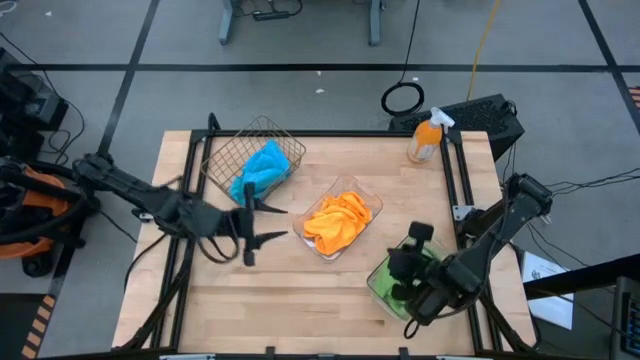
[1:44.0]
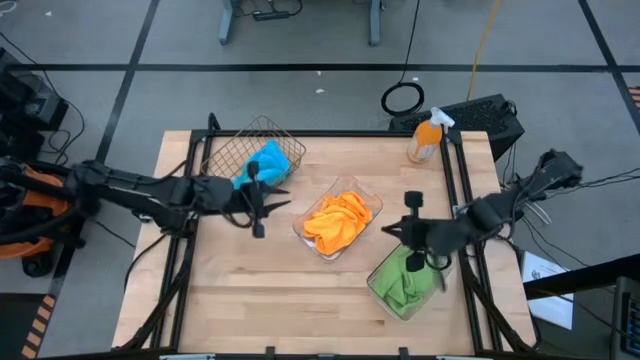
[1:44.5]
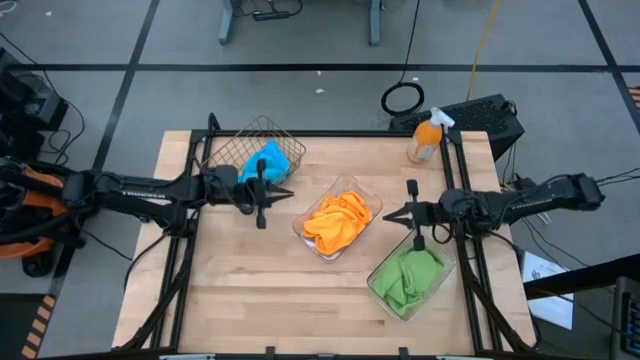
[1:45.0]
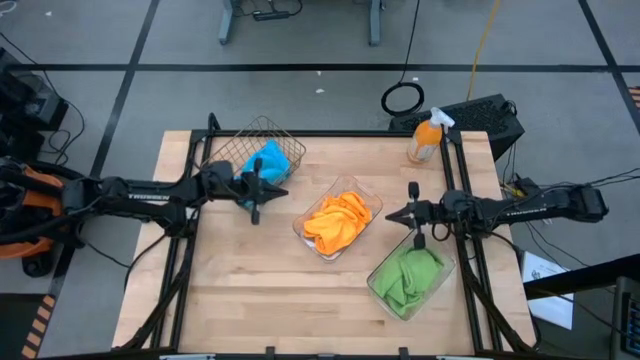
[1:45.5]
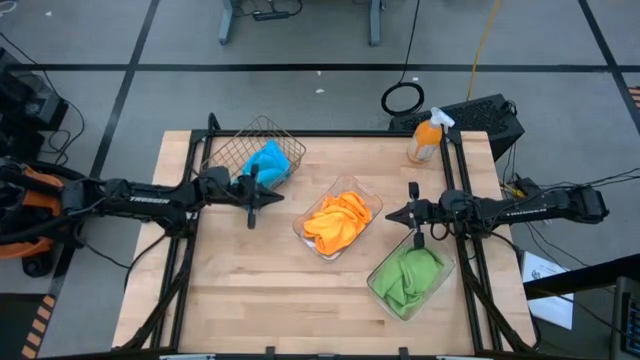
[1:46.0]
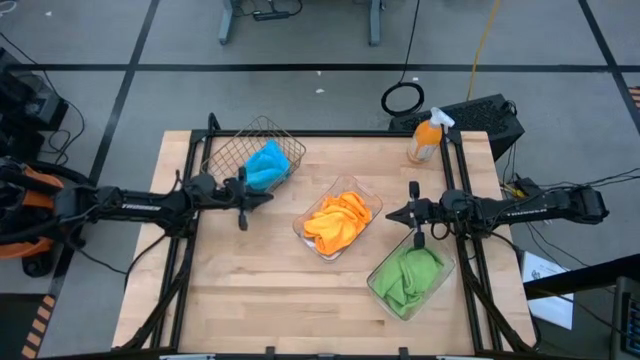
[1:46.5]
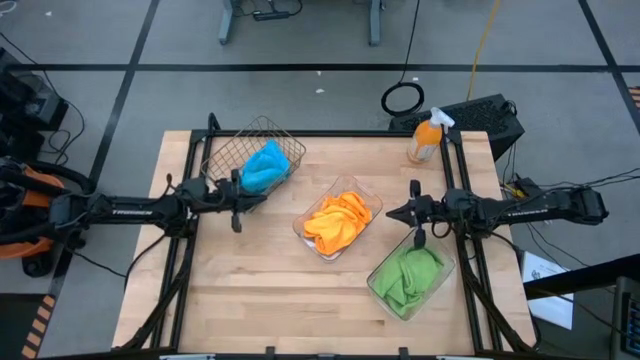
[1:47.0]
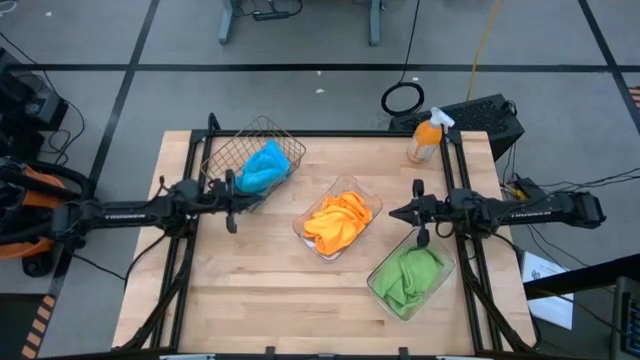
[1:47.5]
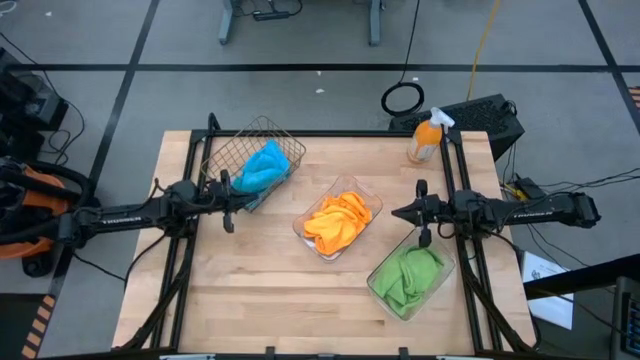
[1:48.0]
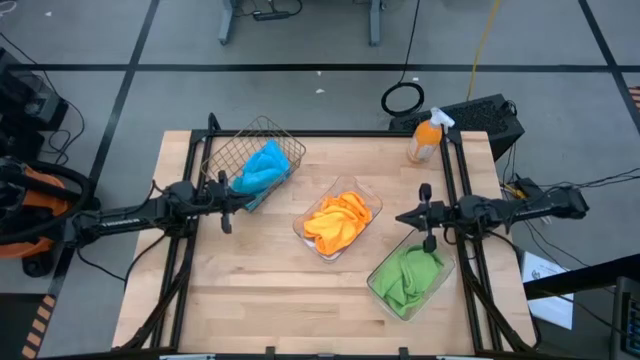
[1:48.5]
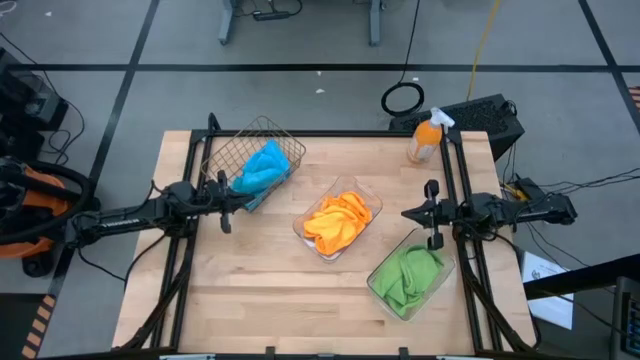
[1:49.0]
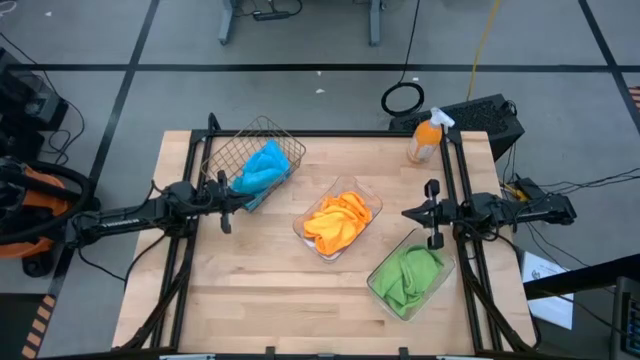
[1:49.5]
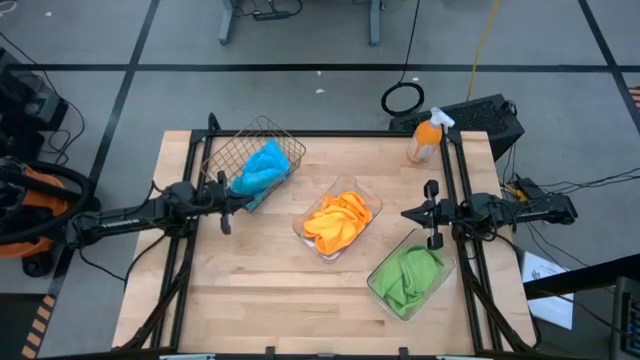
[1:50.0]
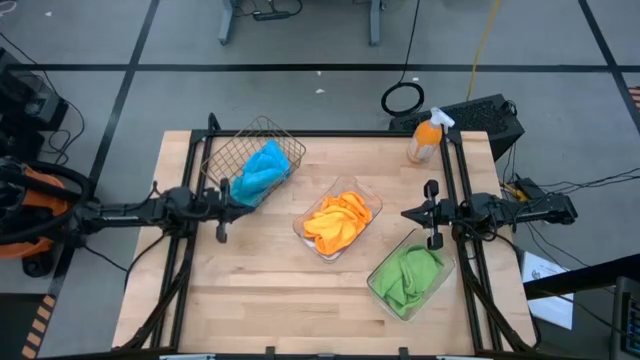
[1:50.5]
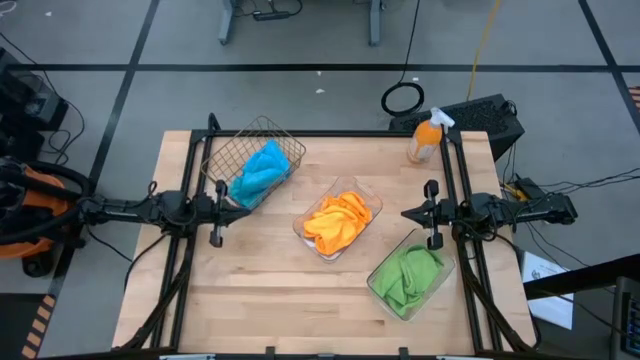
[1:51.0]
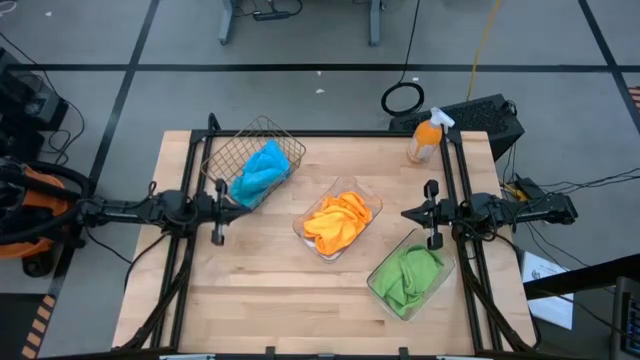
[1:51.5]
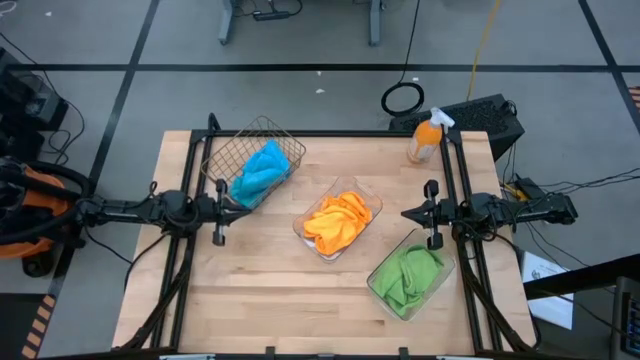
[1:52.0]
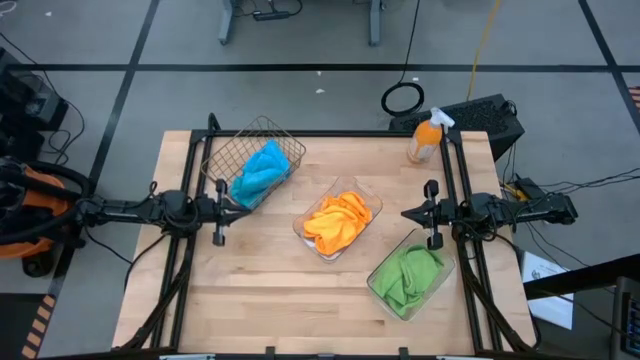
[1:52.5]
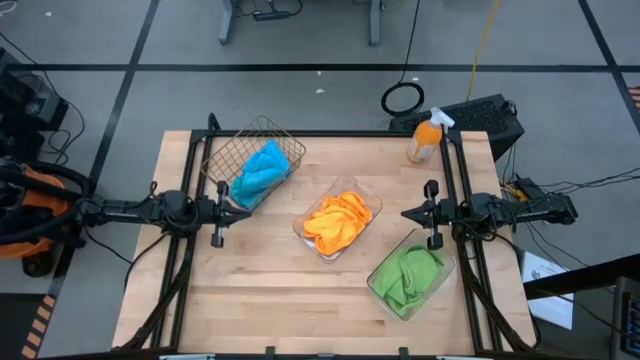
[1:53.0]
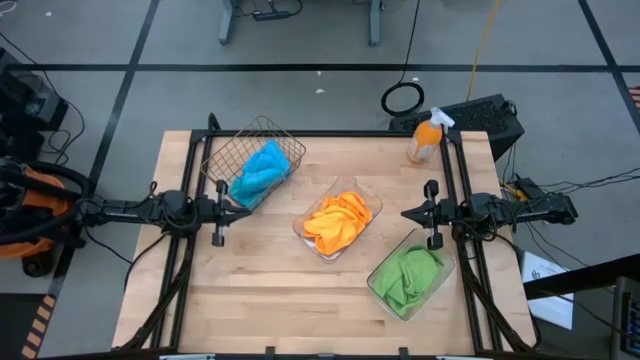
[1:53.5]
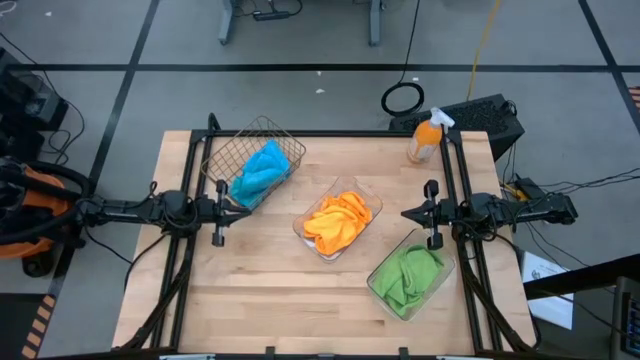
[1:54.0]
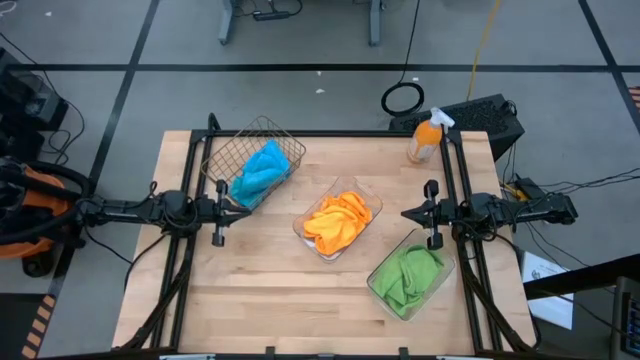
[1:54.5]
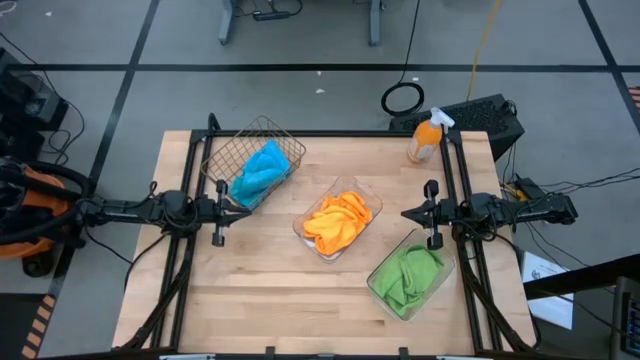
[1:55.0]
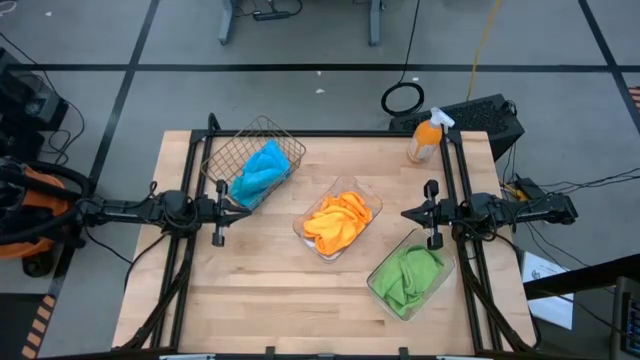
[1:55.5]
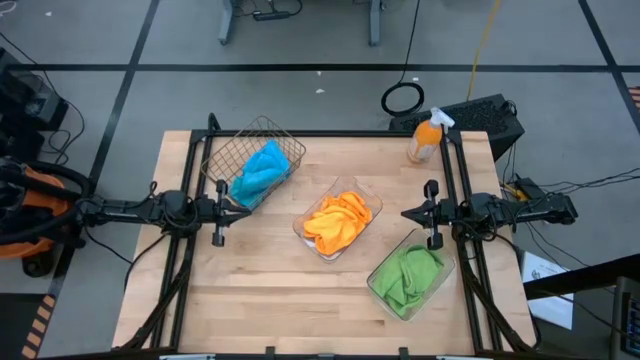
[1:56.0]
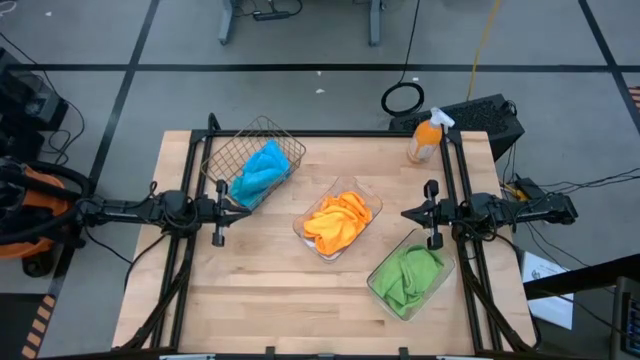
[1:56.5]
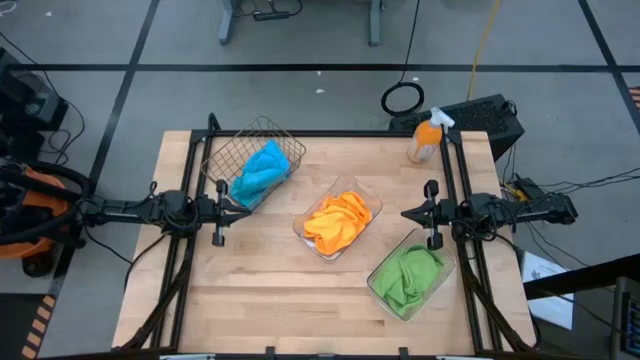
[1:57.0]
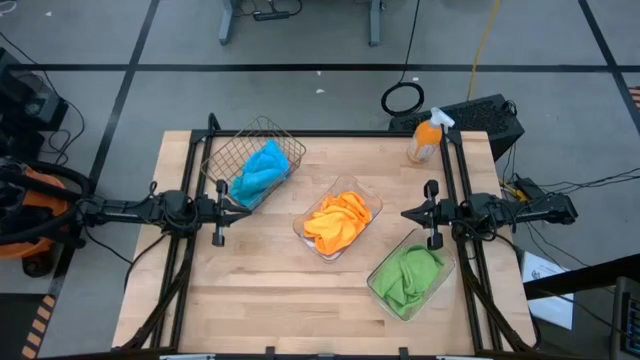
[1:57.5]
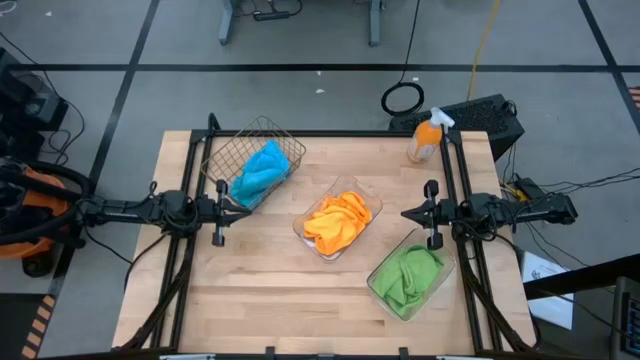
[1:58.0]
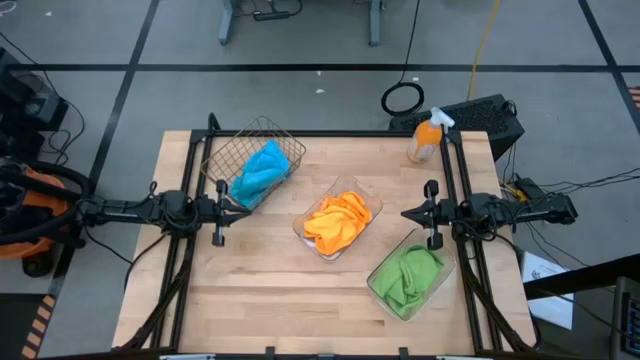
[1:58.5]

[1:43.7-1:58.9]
Task: Sort microfiber towel by color & place in baskets
Return to Home Position

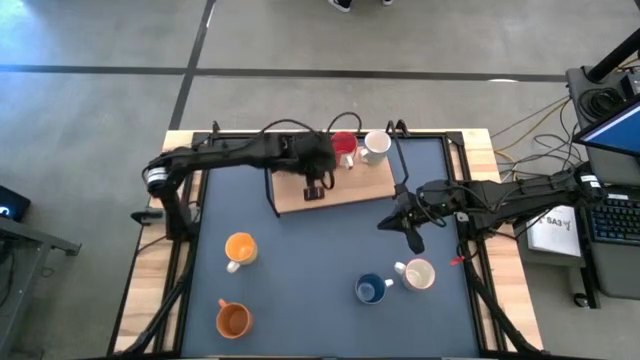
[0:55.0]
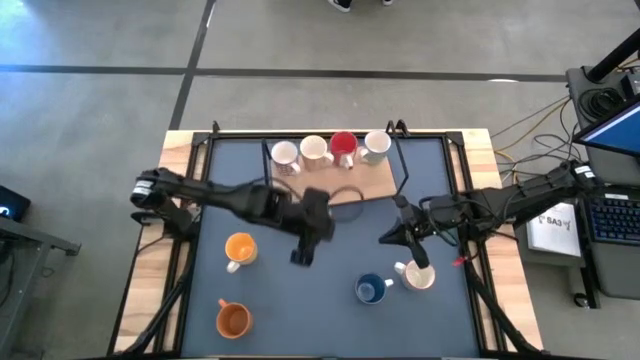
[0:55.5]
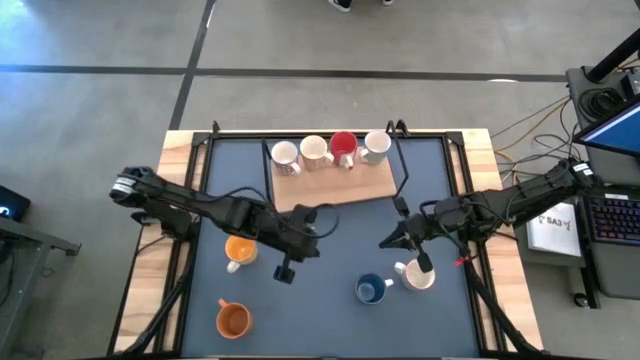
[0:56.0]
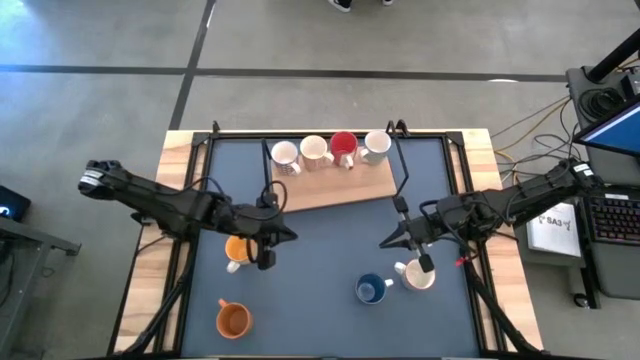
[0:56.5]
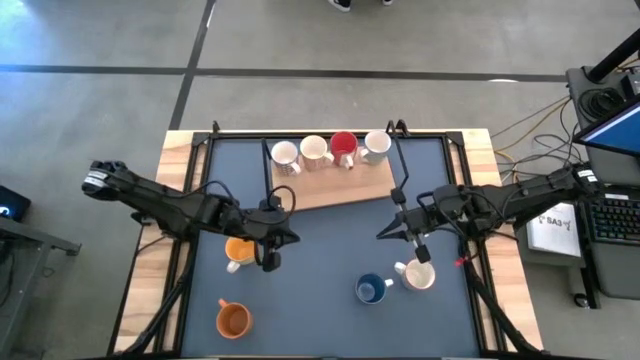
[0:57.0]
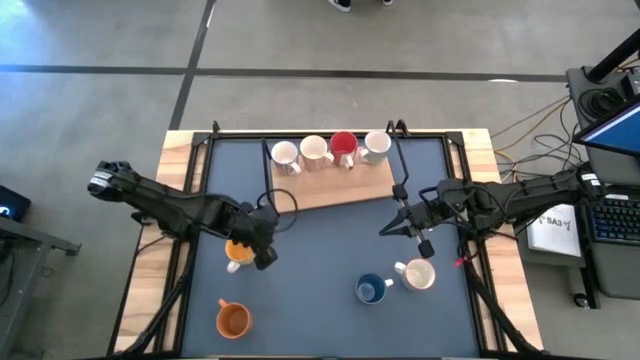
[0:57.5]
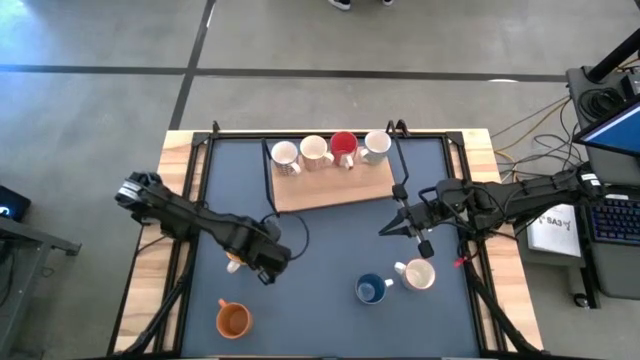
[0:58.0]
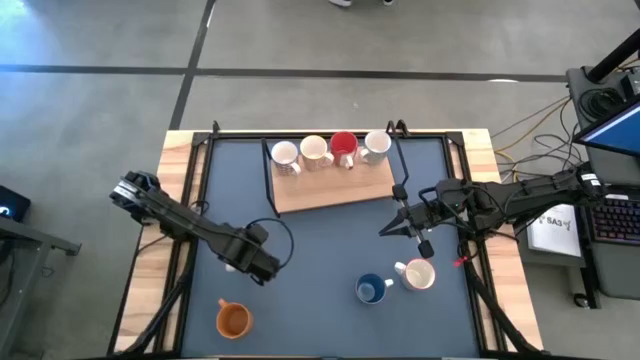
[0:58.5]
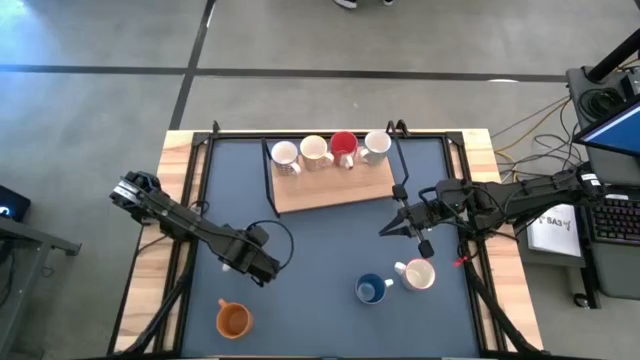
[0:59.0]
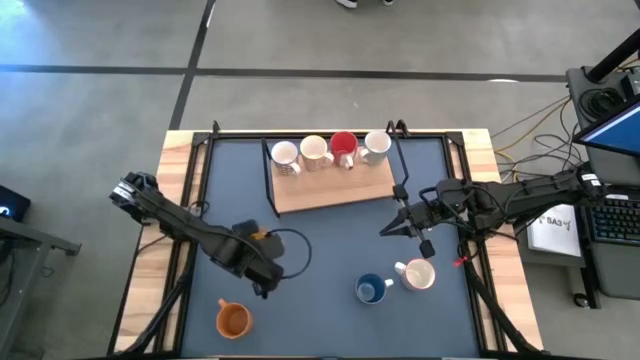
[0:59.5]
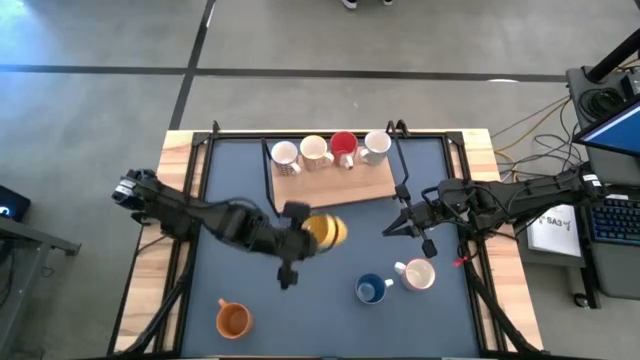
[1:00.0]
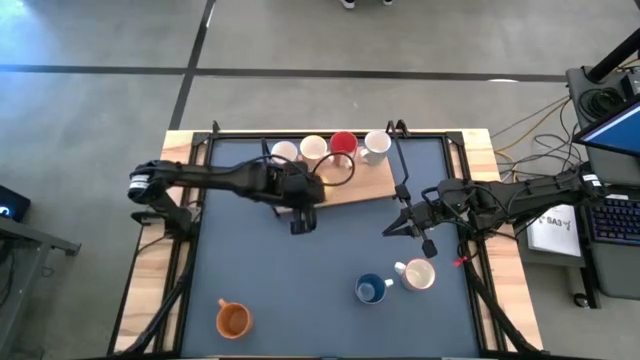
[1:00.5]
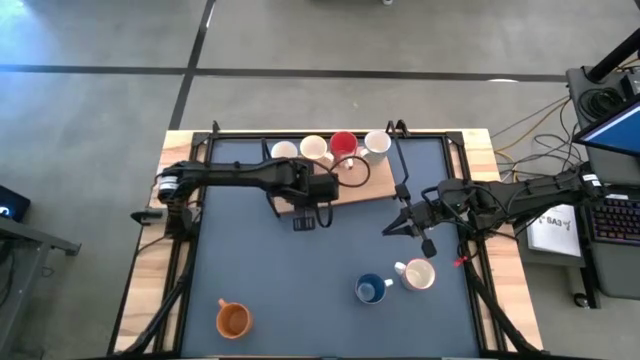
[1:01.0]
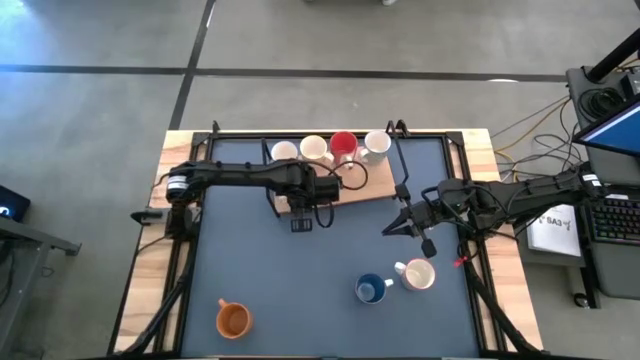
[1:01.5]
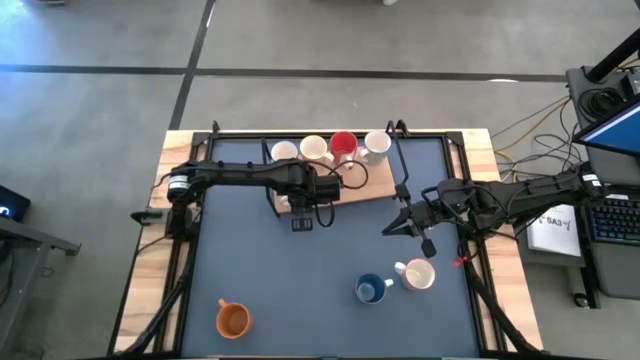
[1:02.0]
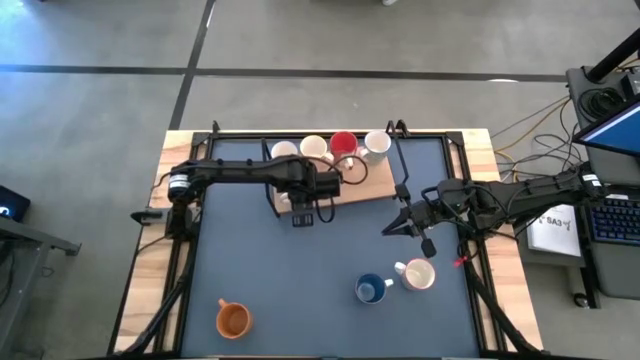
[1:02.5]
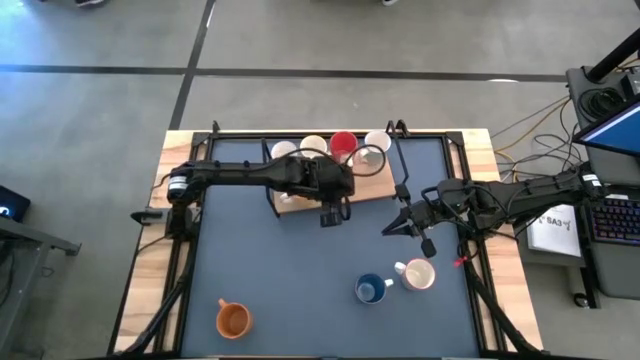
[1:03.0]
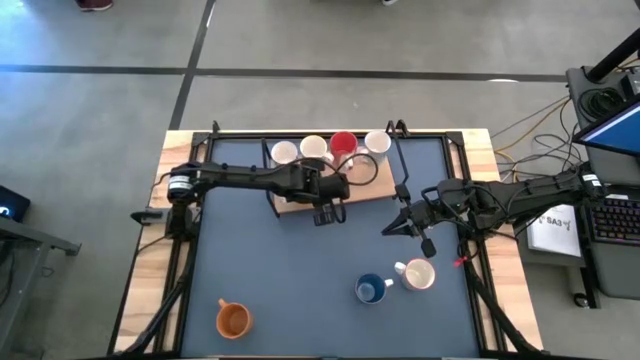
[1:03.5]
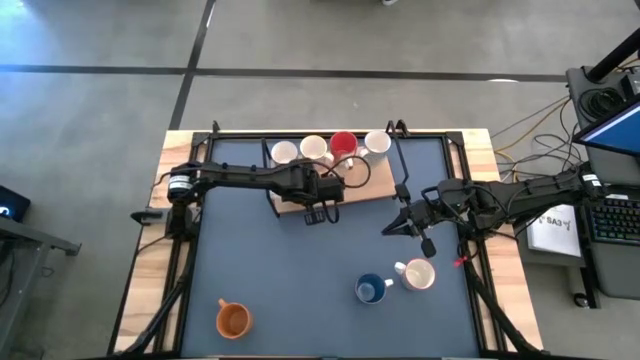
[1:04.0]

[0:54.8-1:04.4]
Task: Place coffee mugs
Put the yellow mug on the shelf
